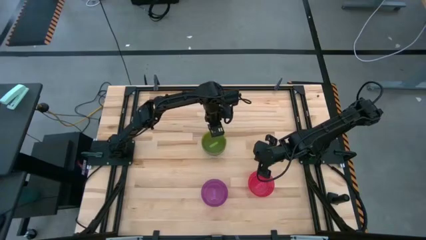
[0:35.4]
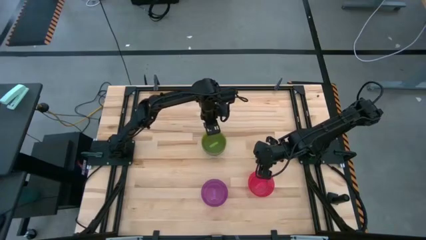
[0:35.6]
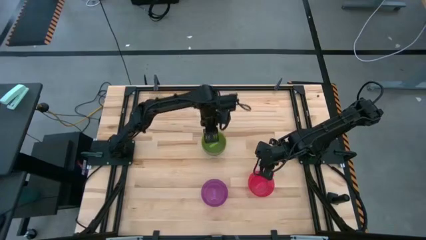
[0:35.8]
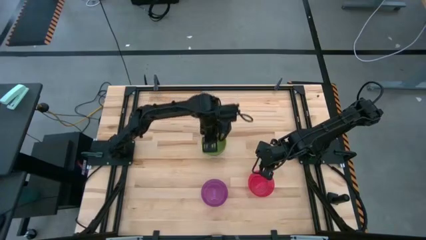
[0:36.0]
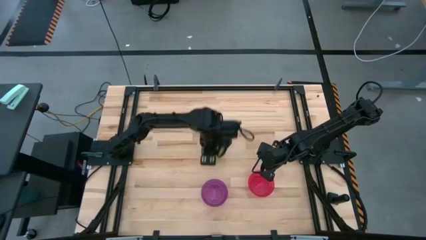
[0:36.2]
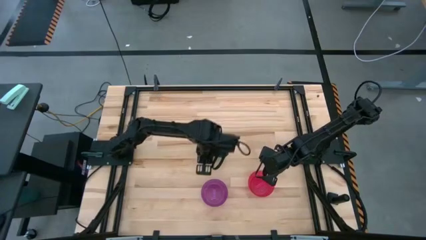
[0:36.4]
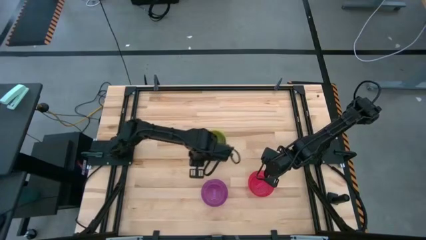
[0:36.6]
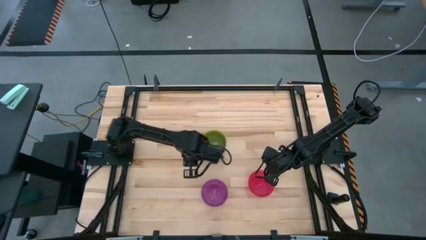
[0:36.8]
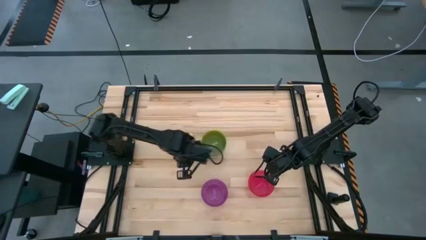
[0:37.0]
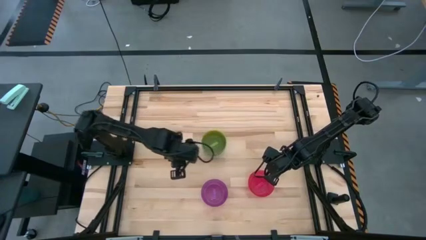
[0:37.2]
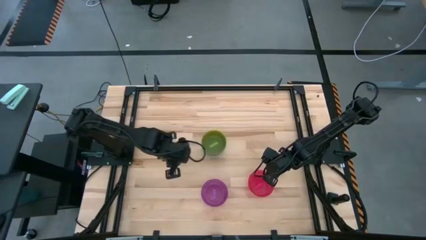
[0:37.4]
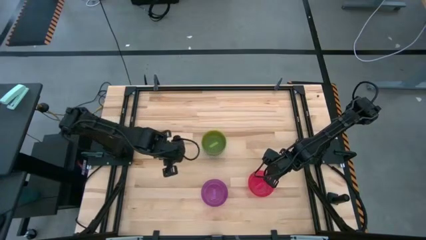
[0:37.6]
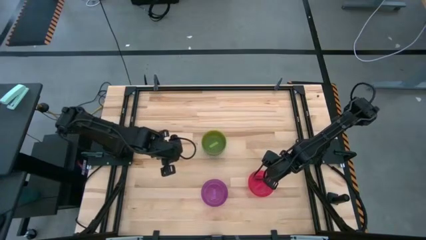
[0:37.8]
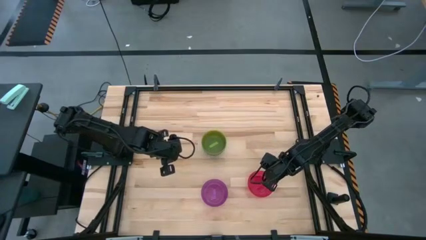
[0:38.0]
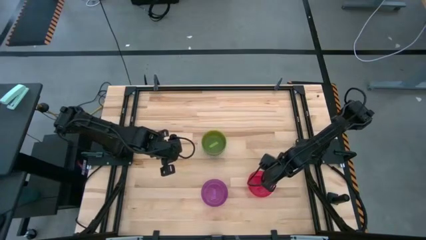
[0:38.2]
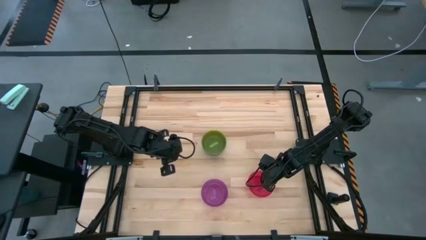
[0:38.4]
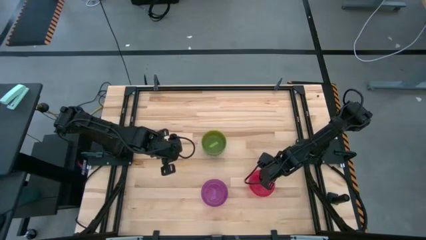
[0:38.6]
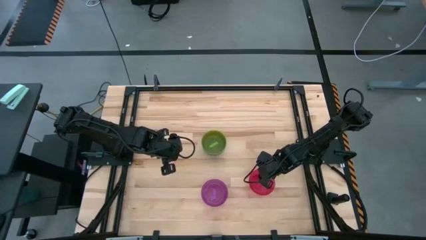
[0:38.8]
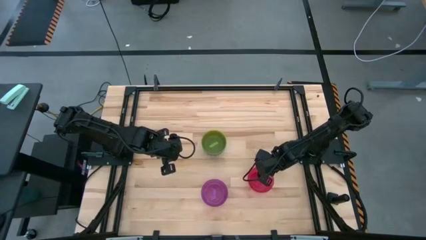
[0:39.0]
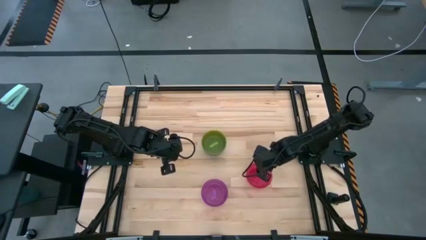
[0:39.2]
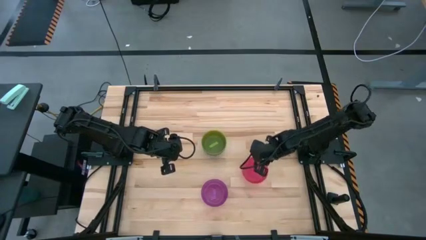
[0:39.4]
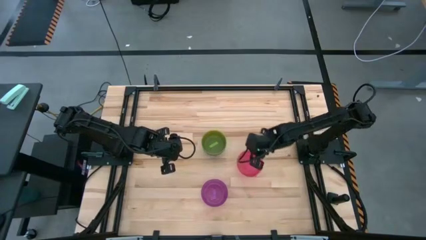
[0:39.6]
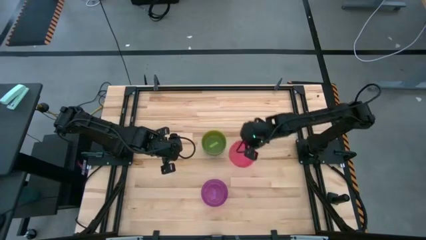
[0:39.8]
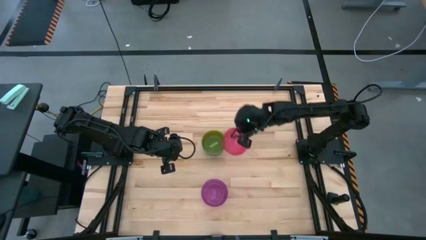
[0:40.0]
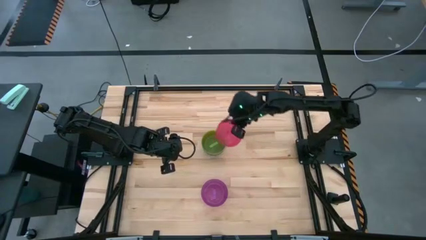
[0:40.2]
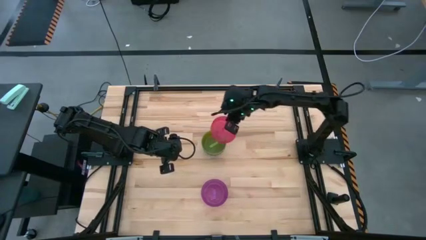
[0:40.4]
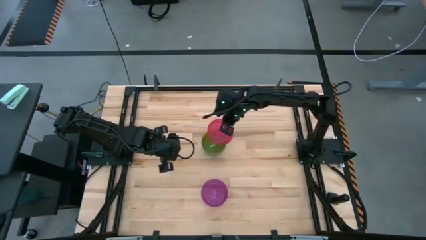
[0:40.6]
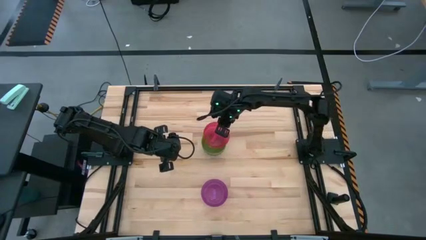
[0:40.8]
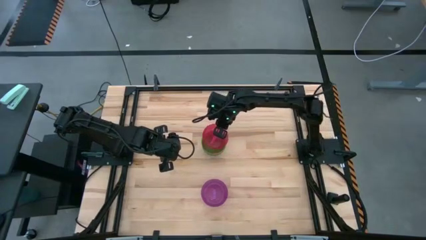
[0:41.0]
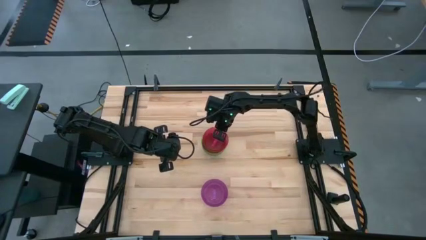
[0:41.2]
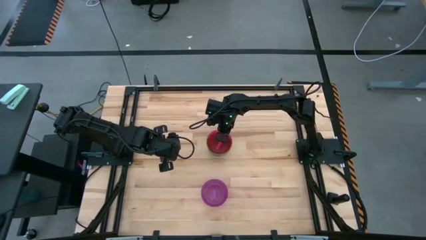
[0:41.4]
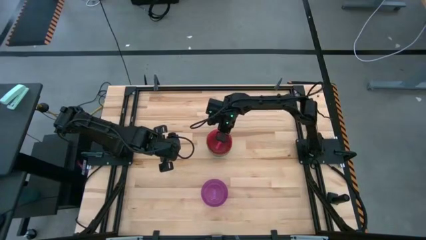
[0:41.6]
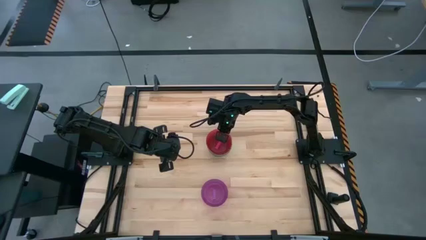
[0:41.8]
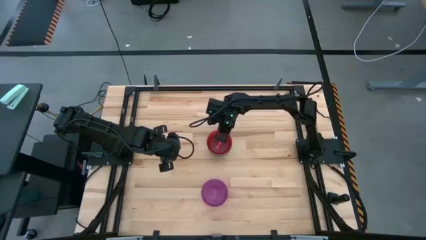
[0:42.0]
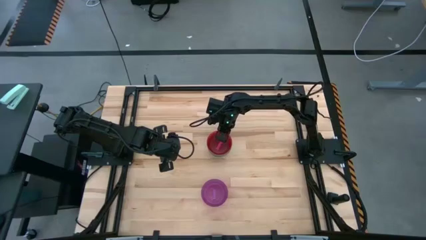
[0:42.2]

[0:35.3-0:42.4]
Task: Nest bowls inside each other
Stack the pink bowl on top of the green bowl

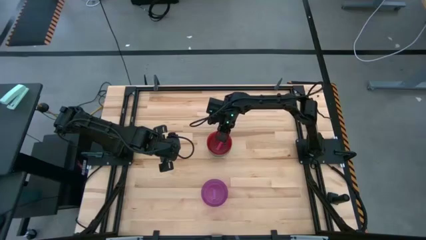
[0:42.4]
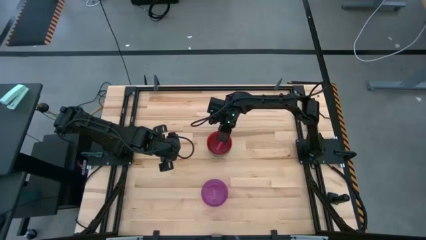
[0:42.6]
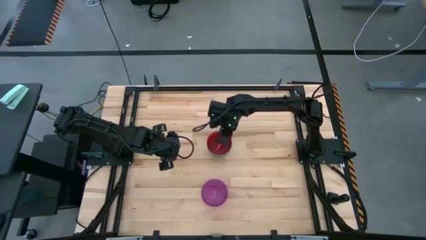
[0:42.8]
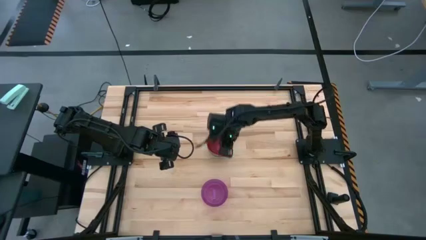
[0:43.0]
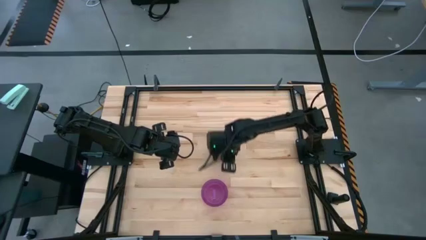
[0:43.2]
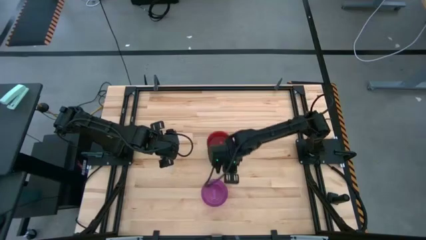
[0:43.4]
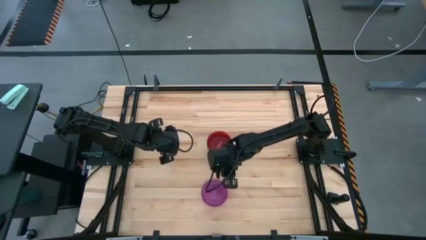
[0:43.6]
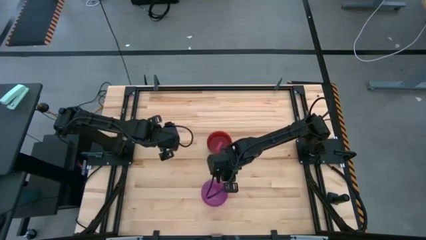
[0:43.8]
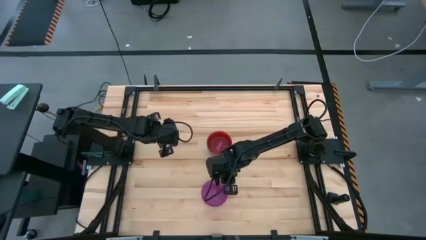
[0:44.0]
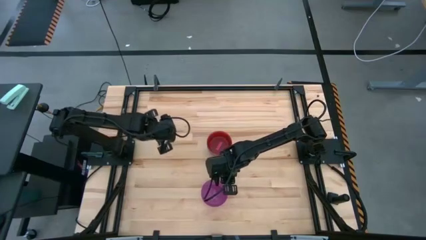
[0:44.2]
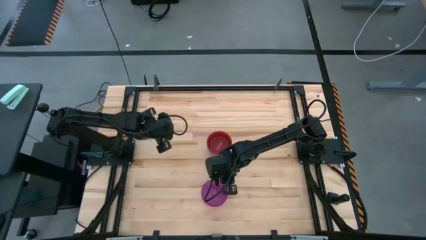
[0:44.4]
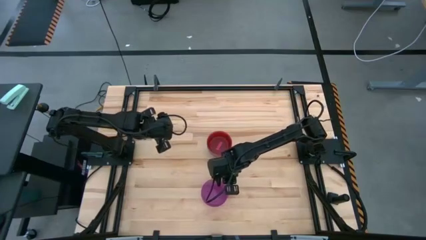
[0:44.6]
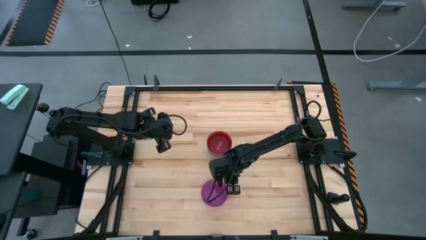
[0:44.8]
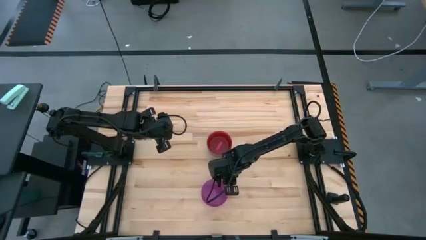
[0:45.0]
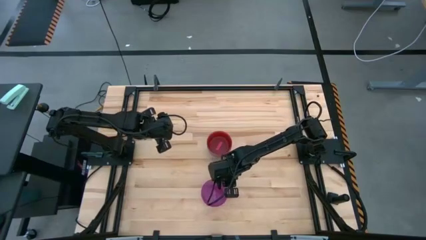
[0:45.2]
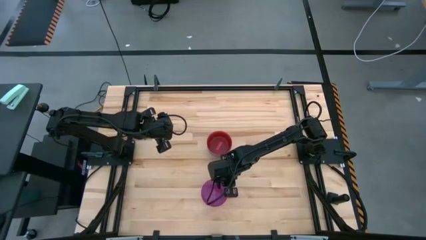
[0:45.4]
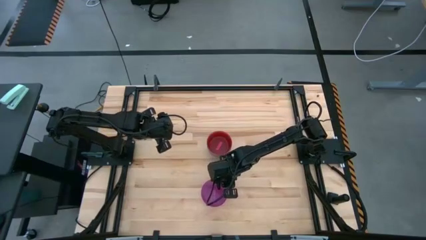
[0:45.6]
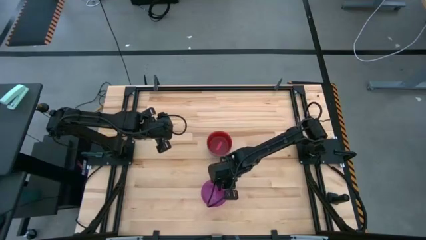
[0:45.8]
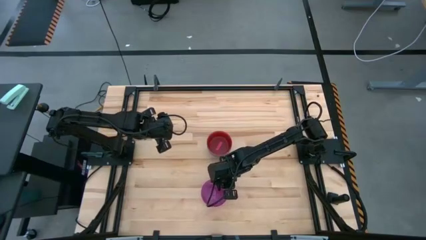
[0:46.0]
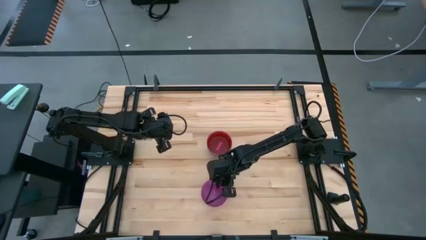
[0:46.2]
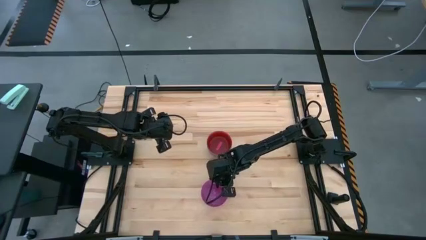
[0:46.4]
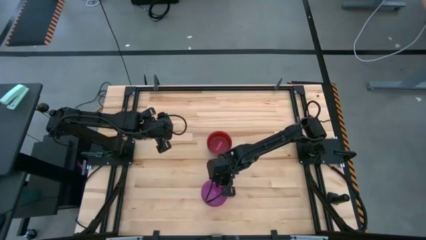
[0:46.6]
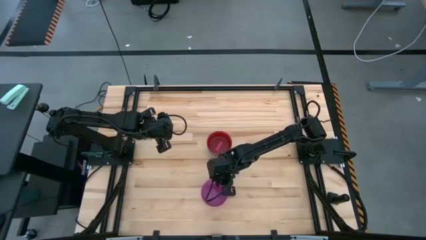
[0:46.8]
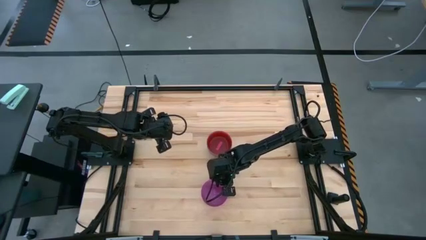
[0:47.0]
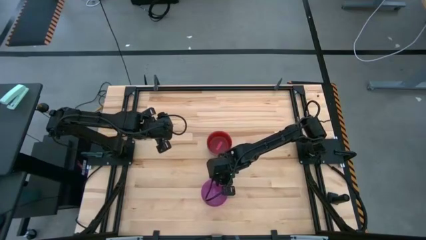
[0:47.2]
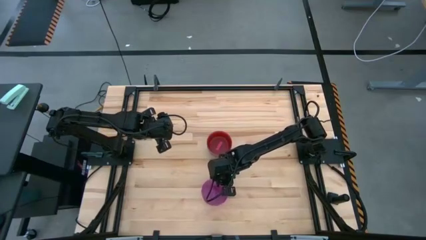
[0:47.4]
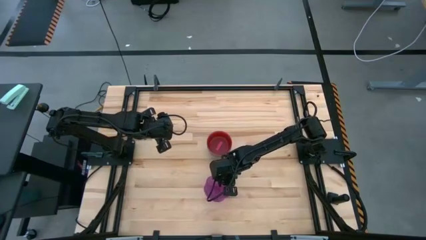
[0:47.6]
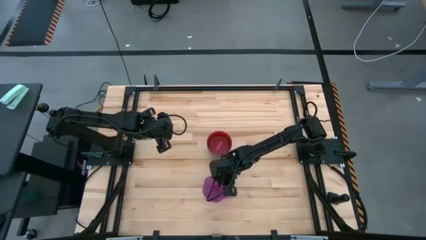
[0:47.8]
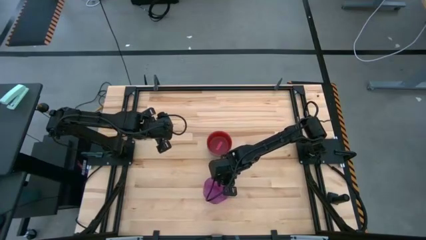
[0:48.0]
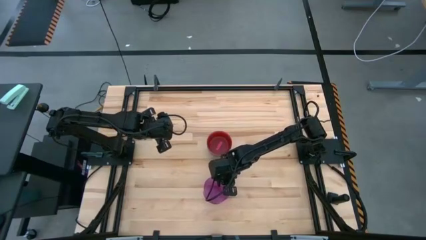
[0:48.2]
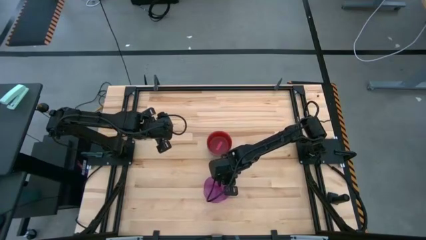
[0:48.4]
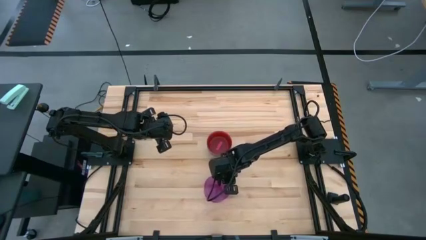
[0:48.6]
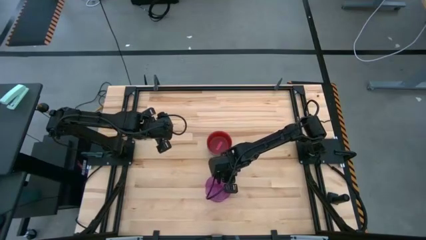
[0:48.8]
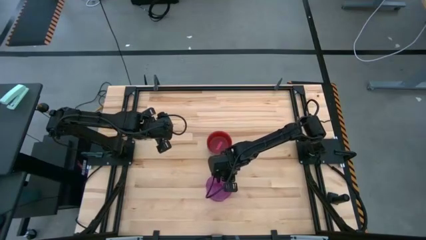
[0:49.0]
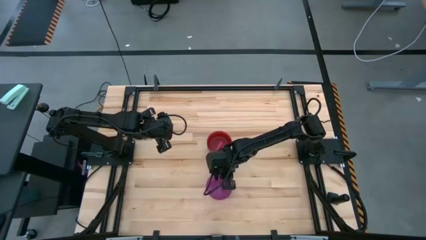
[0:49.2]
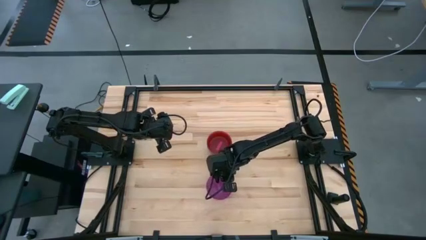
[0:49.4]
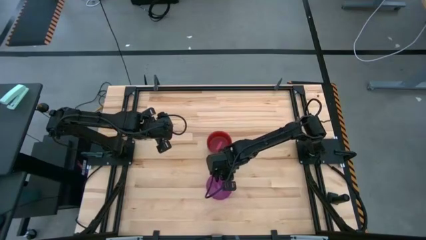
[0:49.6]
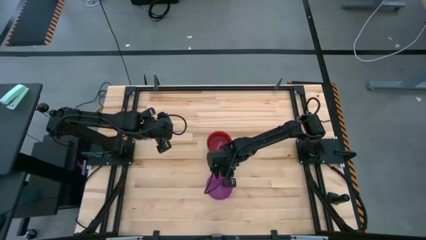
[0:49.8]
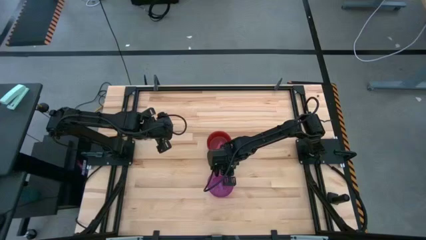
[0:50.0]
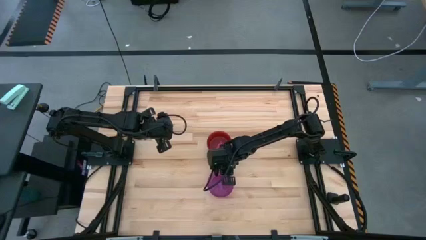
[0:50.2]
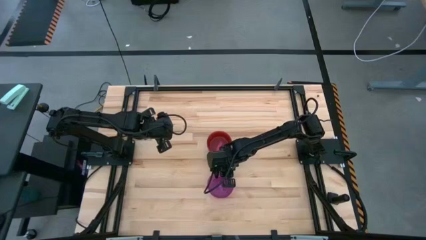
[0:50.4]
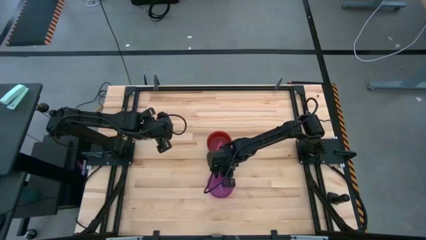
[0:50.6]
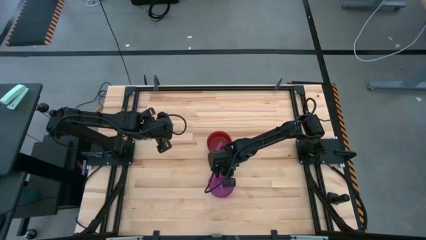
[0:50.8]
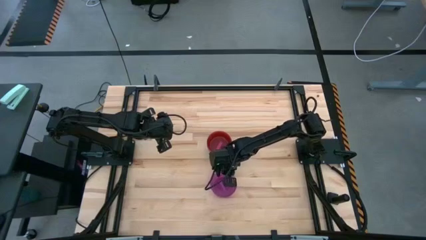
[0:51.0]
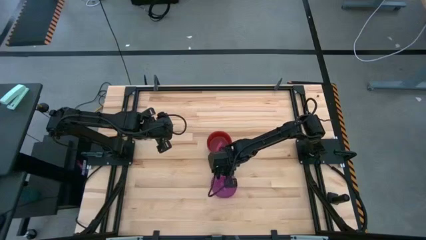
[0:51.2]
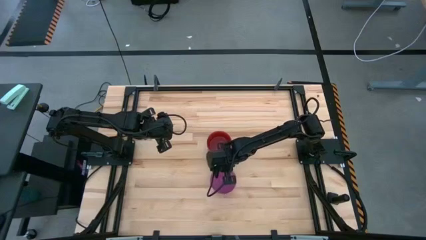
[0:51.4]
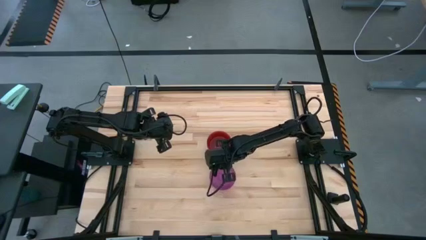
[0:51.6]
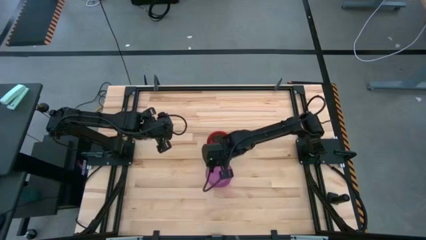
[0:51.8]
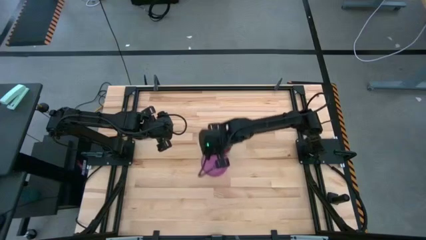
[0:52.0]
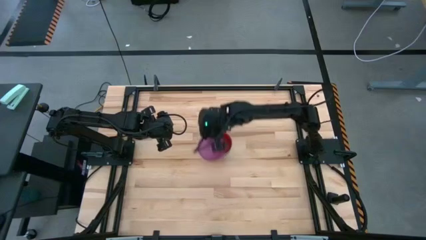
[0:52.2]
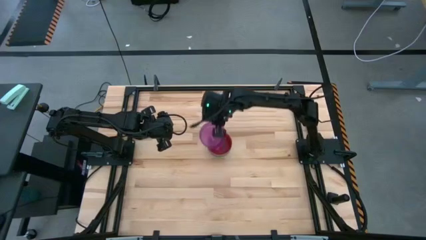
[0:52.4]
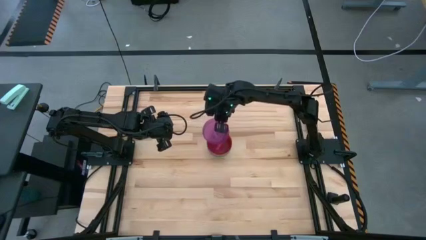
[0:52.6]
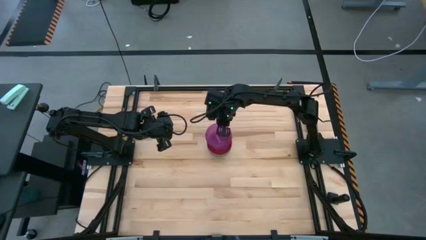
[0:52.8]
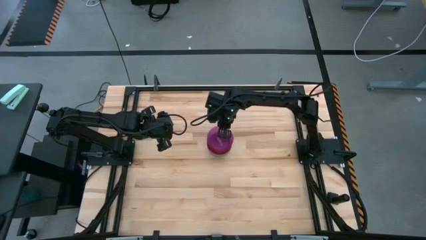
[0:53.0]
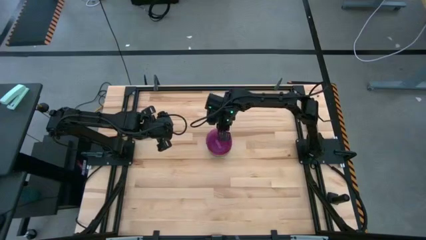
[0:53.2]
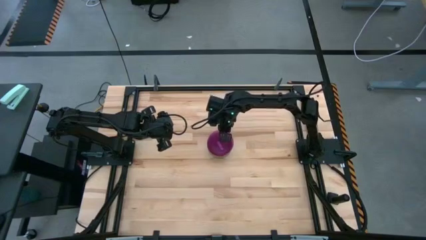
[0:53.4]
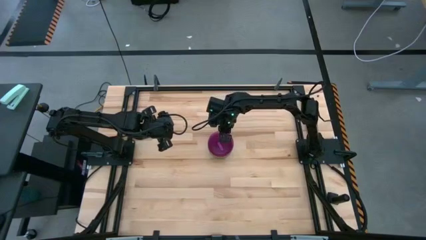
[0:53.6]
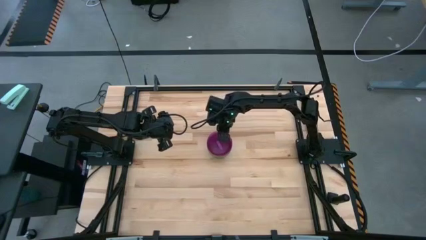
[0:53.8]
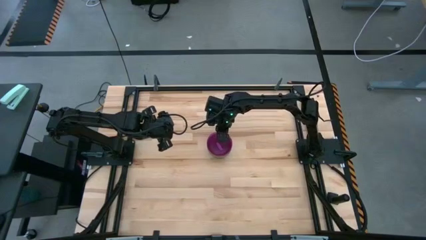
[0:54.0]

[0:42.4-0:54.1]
Stack the purple bowl on top of the pink bowl
